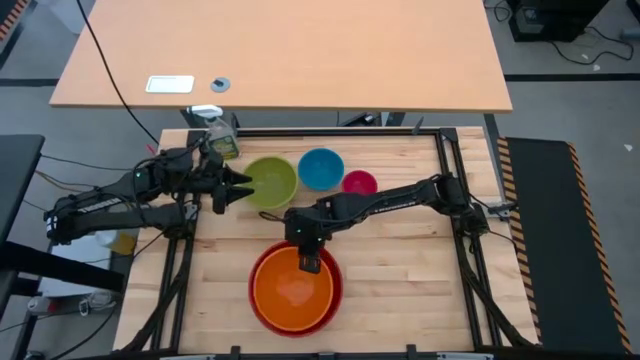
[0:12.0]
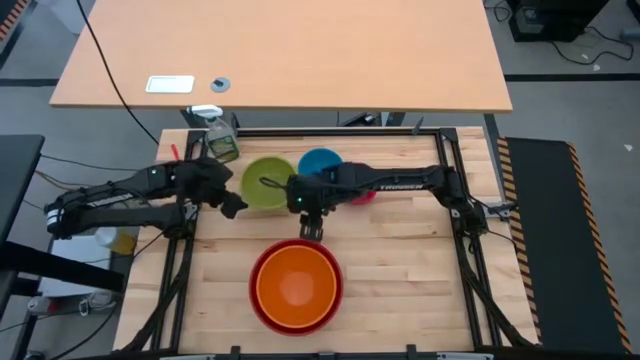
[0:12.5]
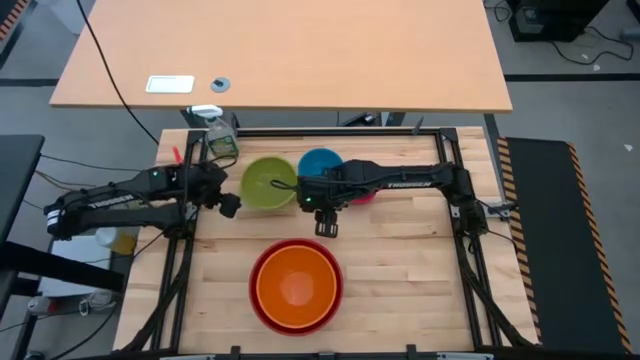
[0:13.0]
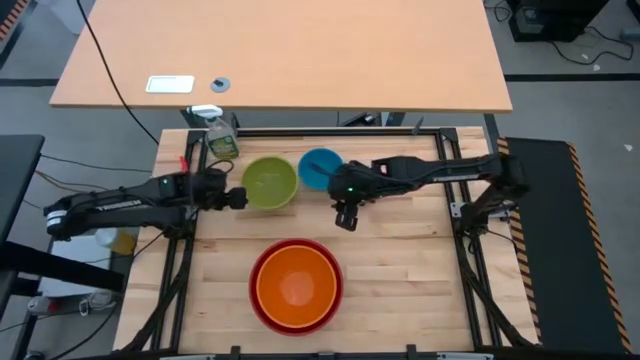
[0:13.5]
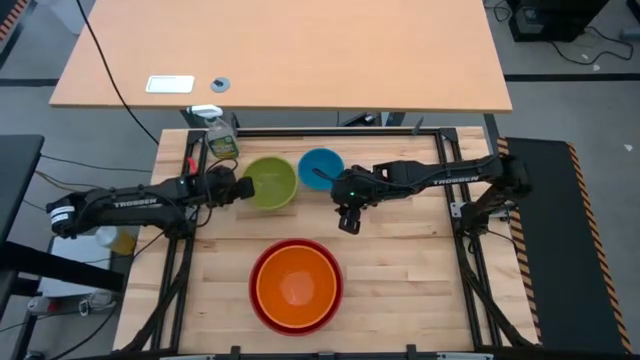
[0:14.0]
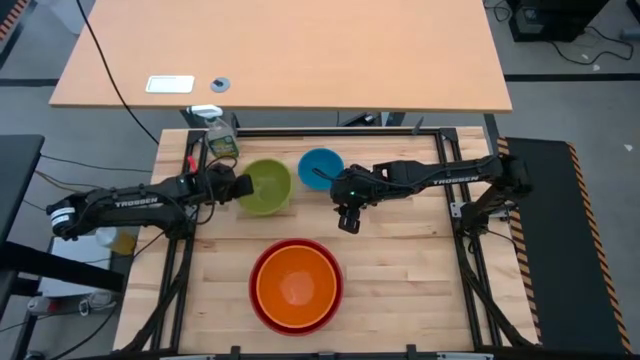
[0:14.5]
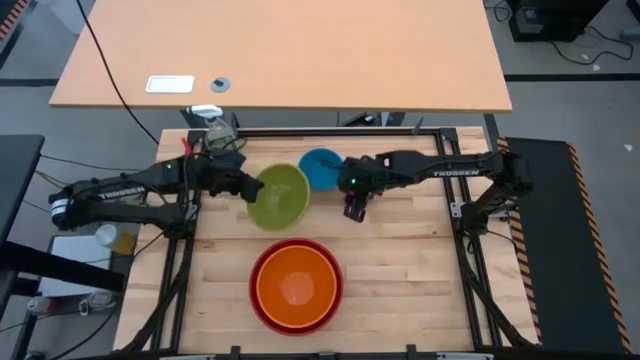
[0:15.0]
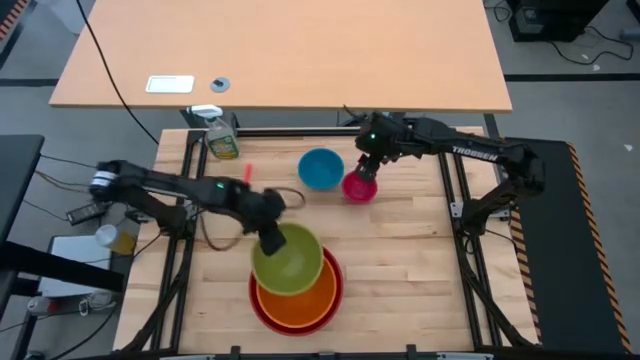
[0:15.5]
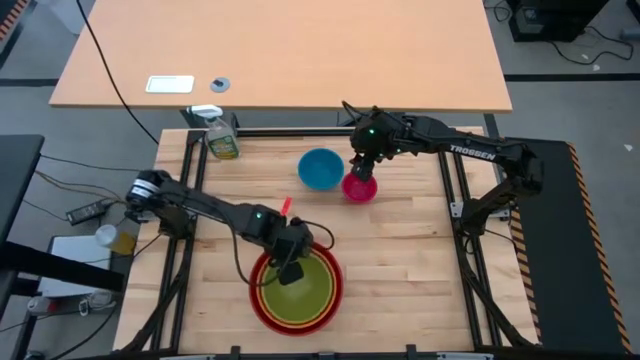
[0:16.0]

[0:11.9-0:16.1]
Stack the green bowl into the orange bowl

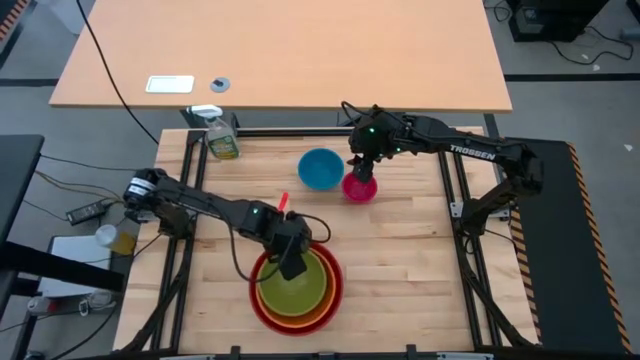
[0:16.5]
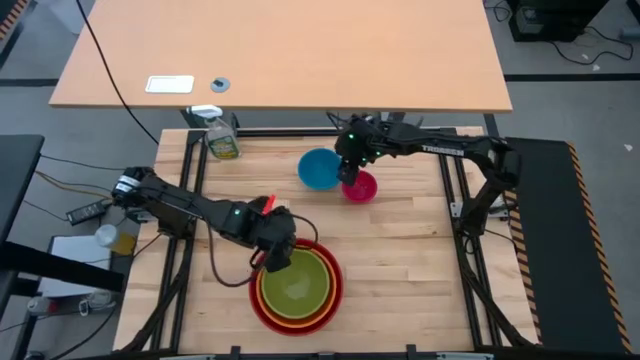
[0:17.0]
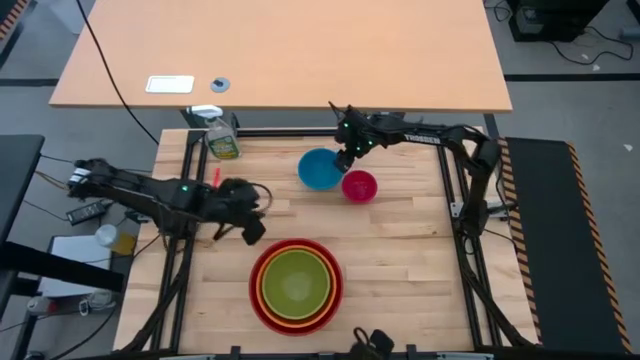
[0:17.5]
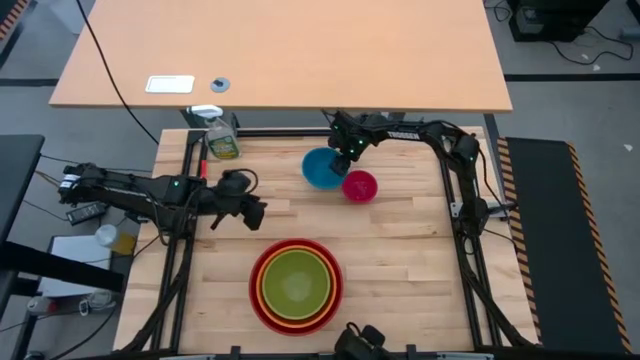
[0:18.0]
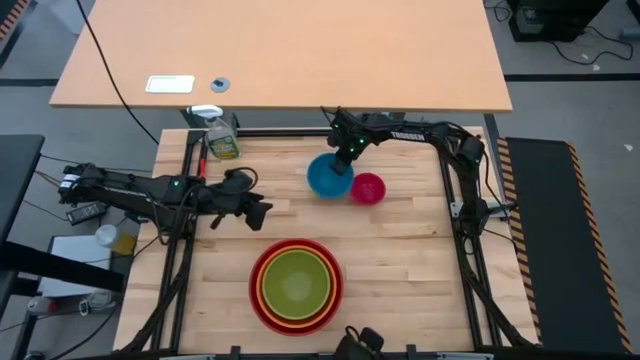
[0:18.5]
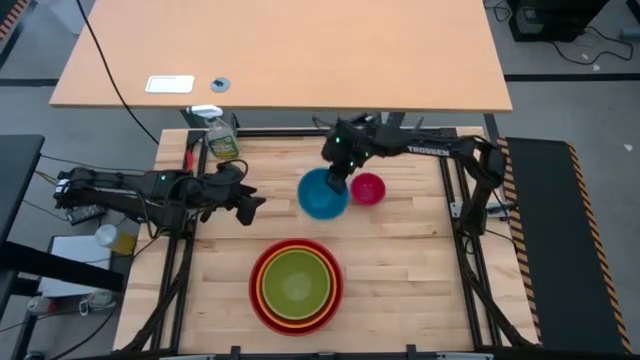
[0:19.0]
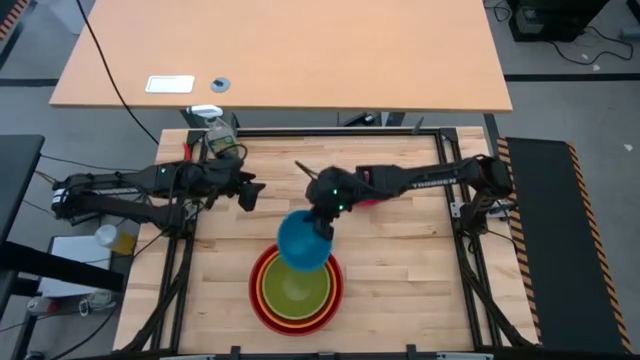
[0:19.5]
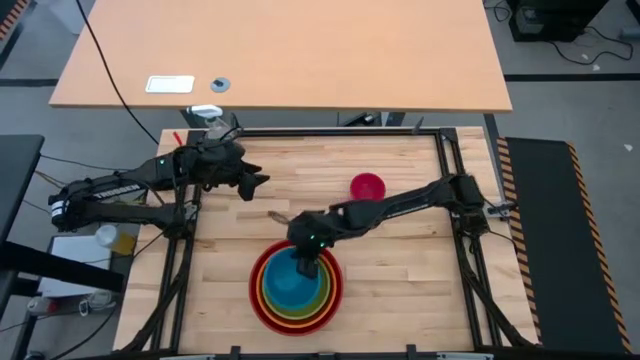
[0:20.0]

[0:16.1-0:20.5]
Stack the blue bowl into the green bowl

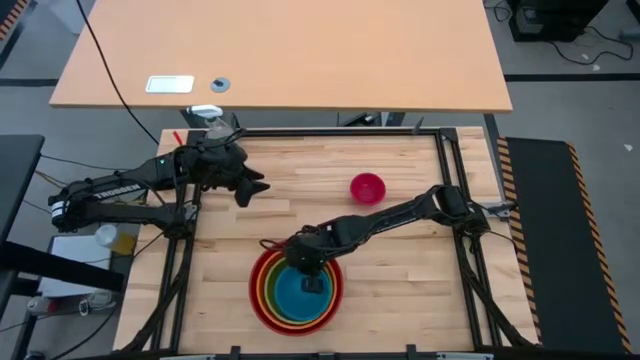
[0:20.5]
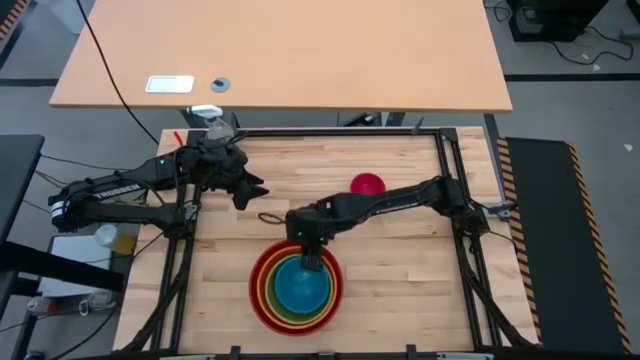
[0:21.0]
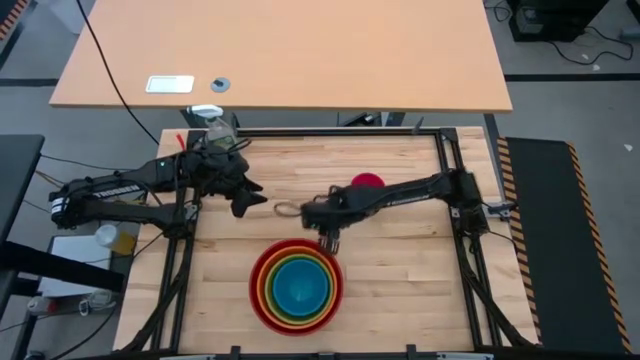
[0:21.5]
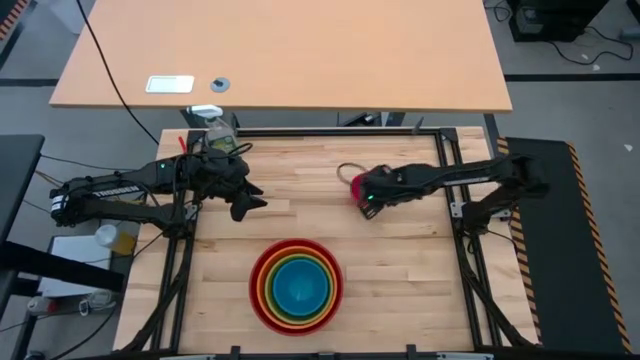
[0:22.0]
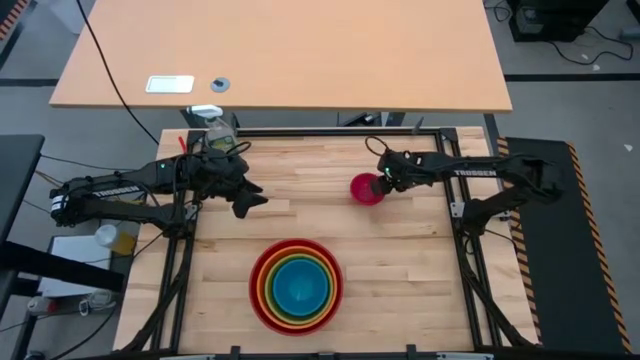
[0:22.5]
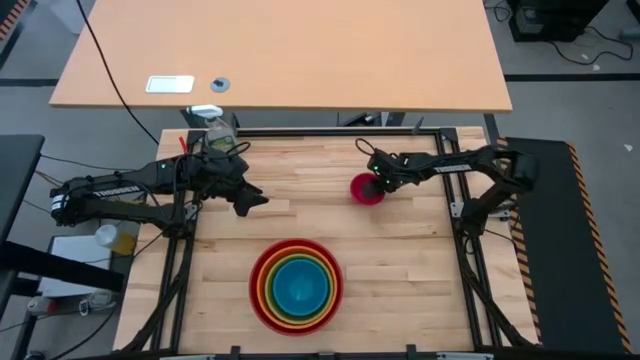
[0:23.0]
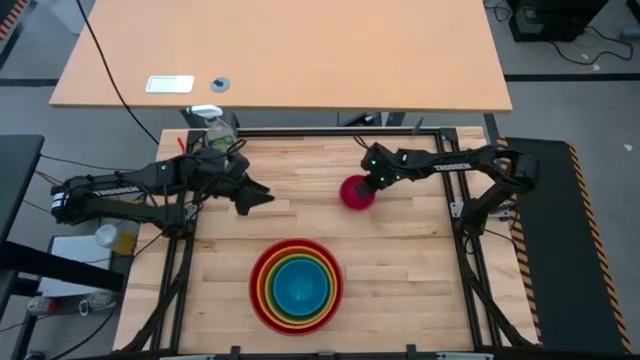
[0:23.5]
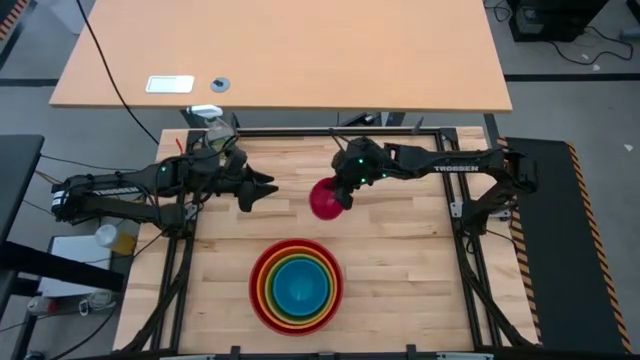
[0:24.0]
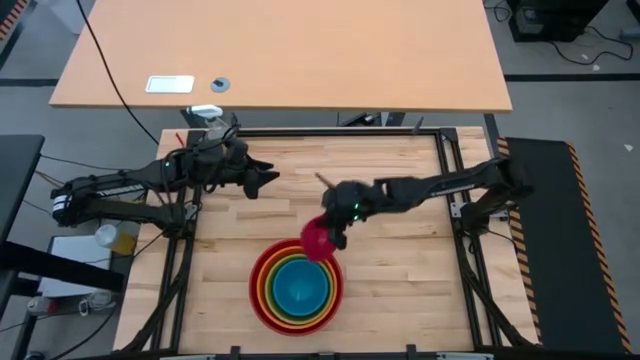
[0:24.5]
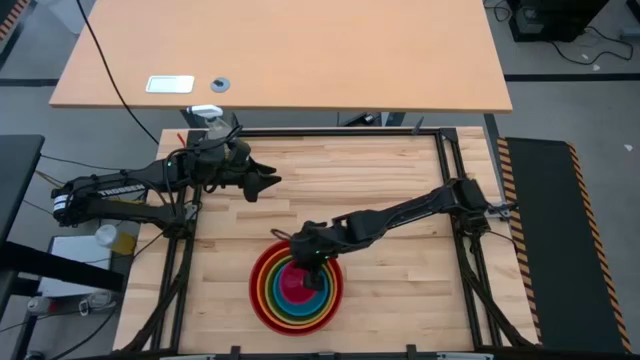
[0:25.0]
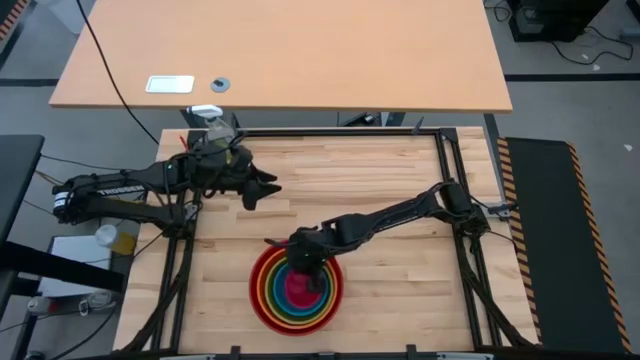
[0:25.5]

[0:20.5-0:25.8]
Stack the pink bowl into the blue bowl

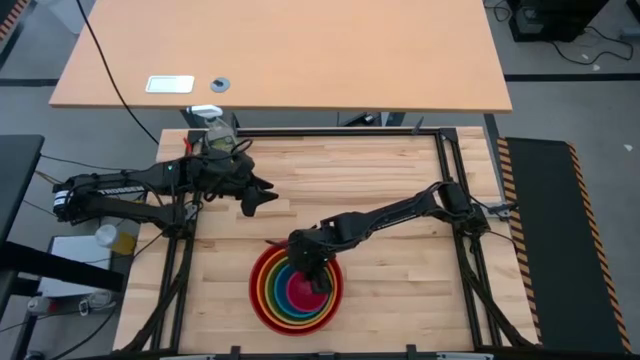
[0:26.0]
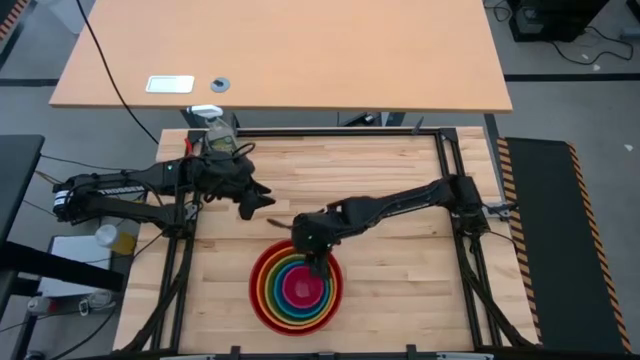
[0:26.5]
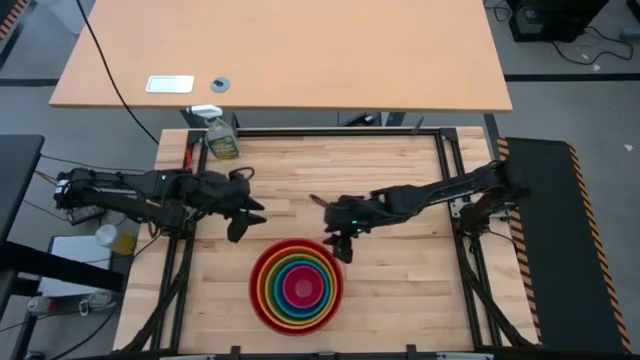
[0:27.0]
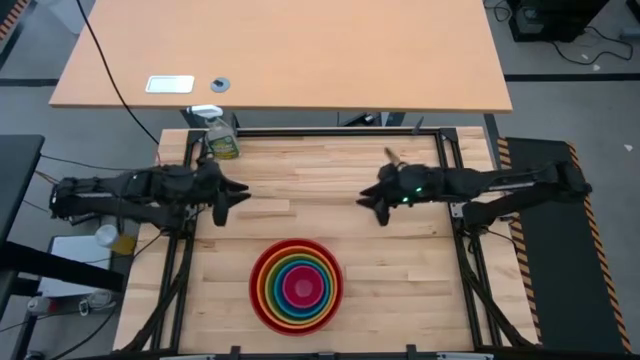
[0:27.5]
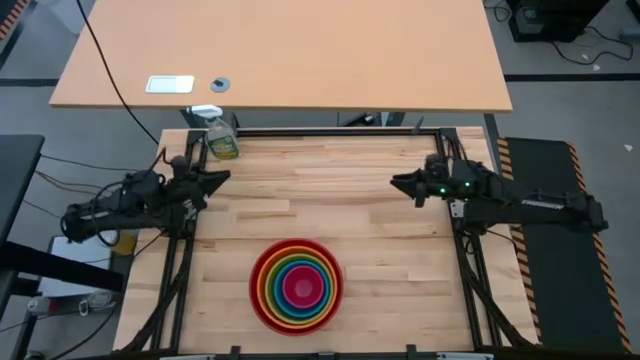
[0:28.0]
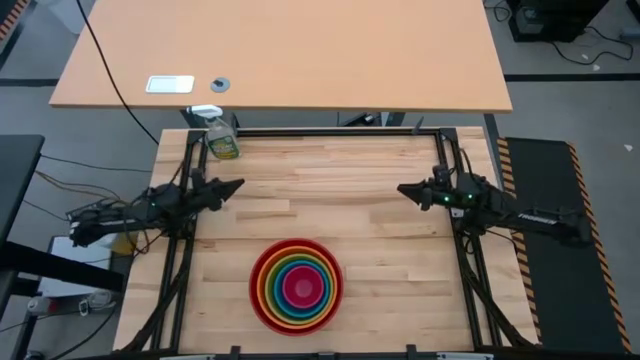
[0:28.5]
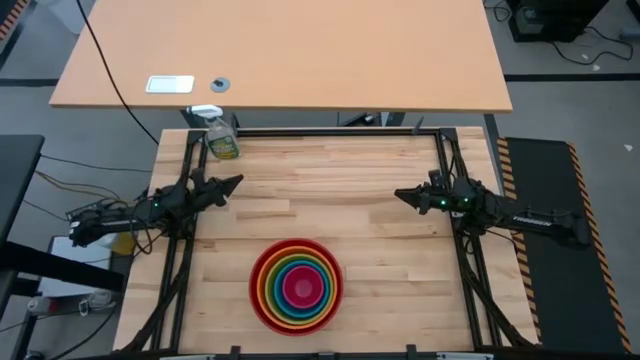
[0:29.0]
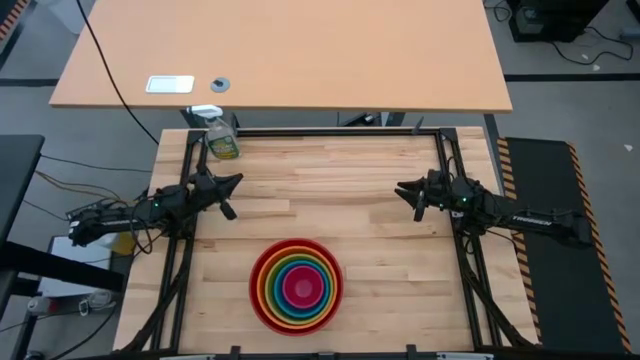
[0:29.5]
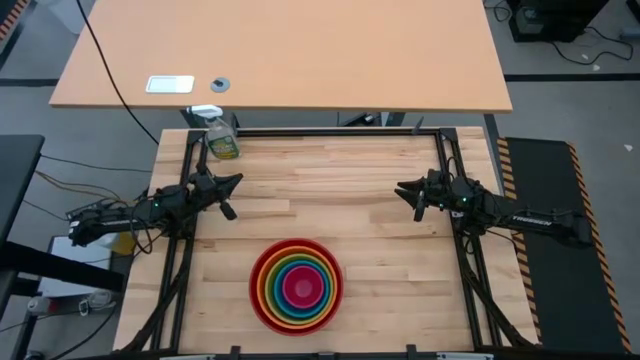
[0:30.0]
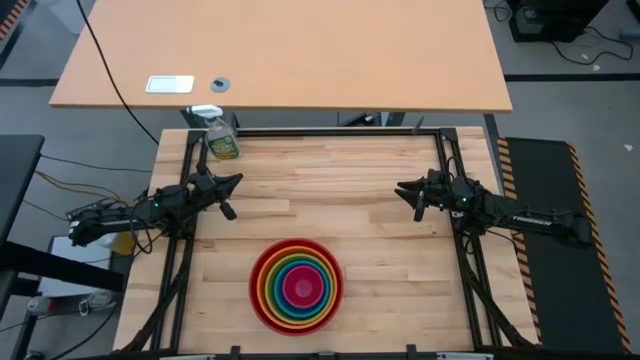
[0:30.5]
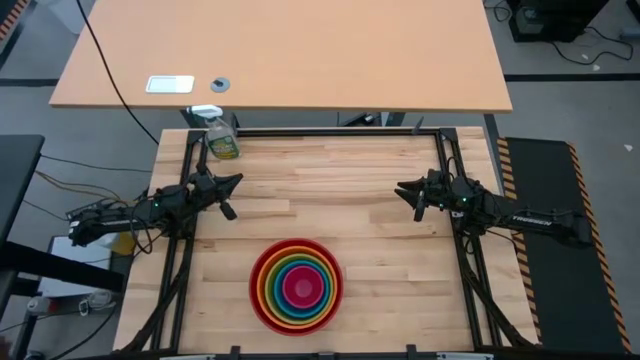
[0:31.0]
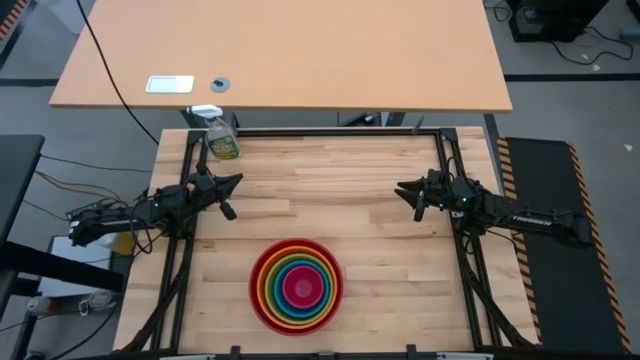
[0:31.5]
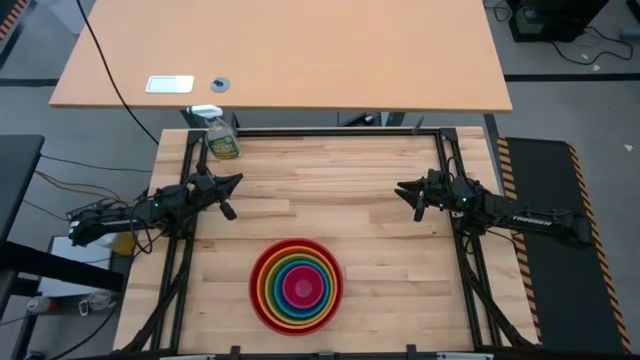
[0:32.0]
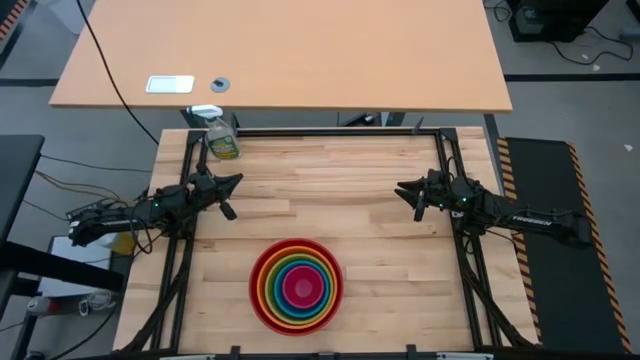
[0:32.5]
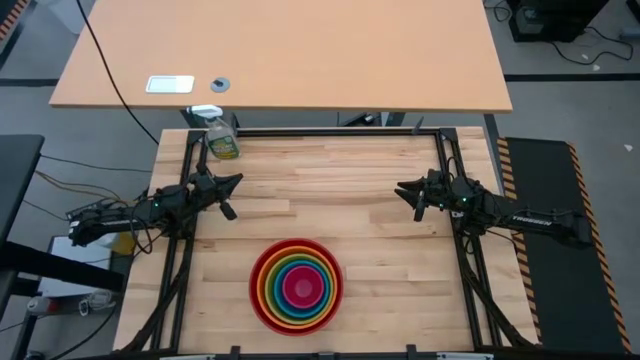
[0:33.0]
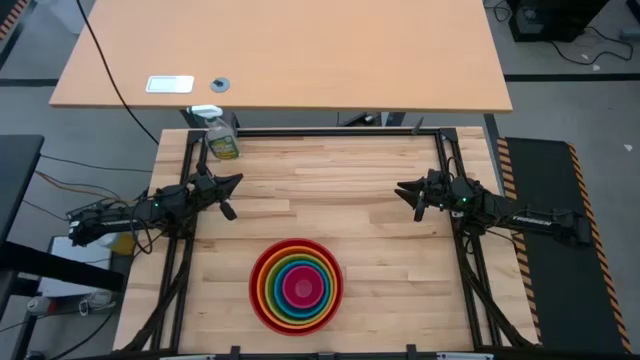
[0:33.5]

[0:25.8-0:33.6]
Return to Home Position
